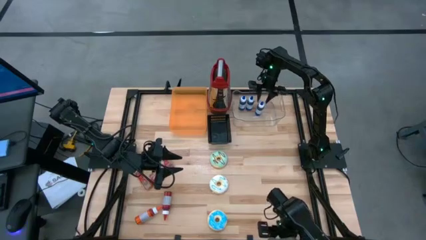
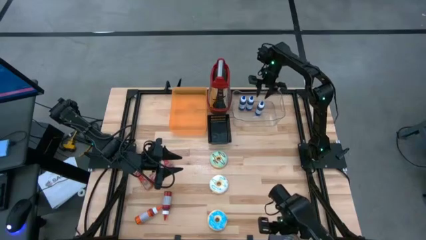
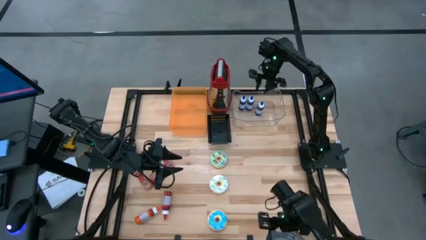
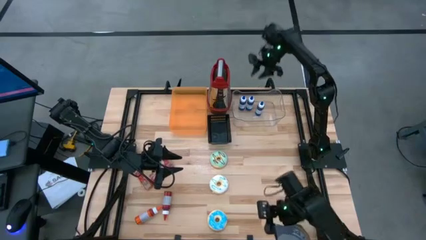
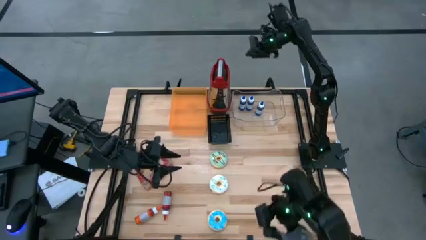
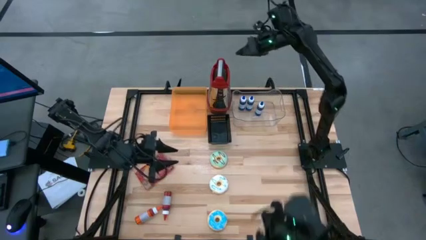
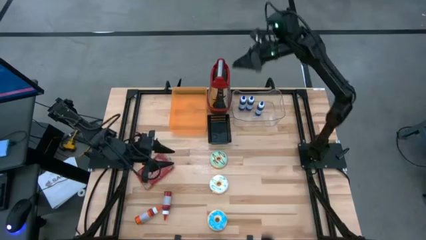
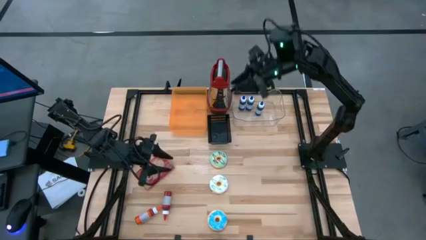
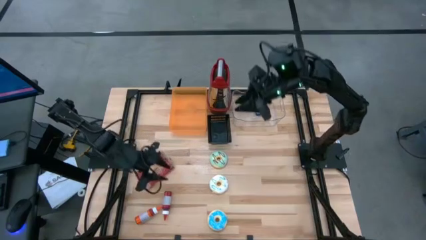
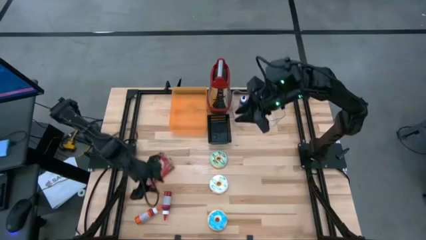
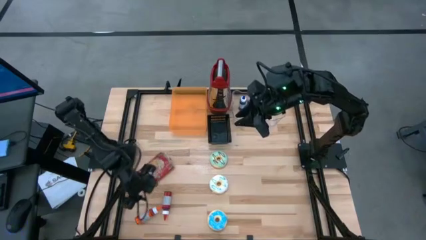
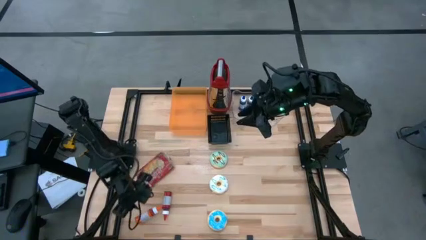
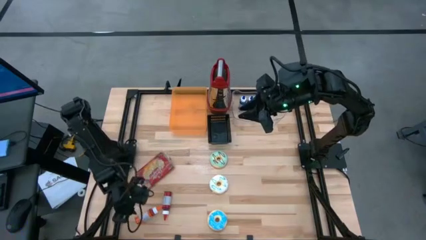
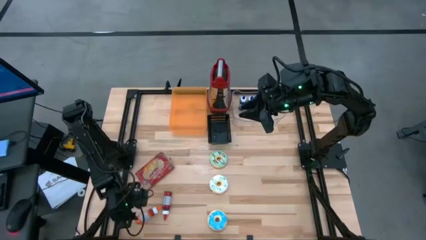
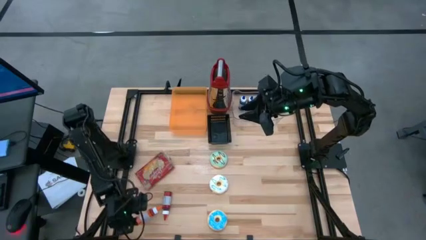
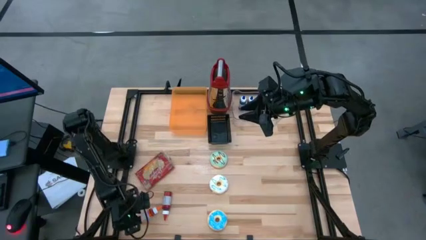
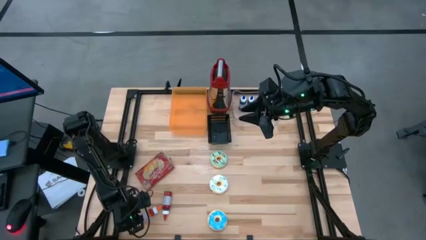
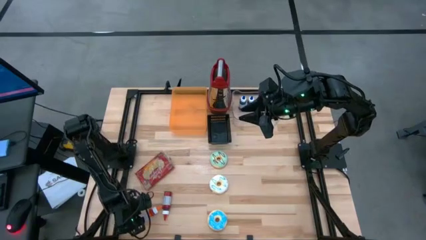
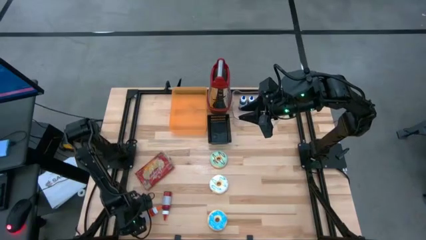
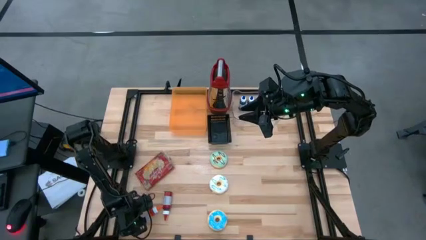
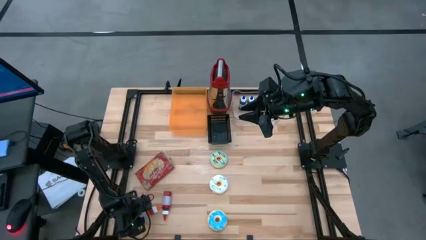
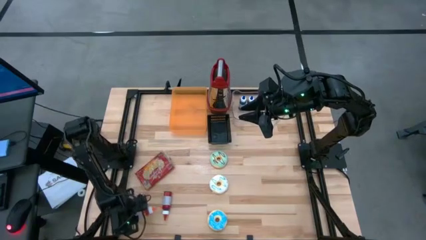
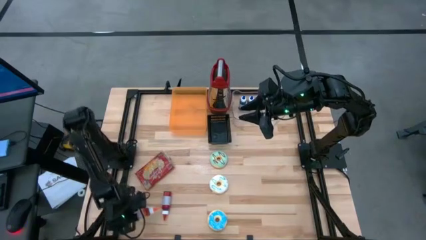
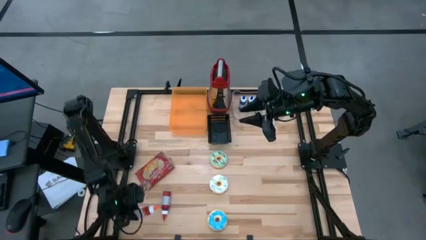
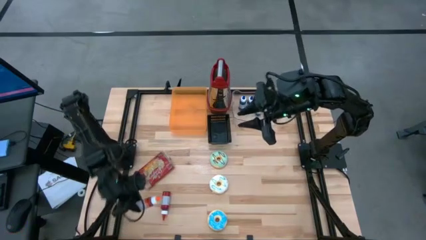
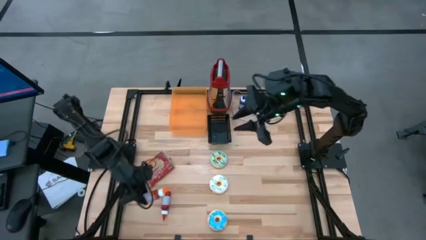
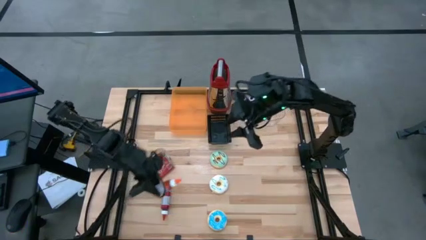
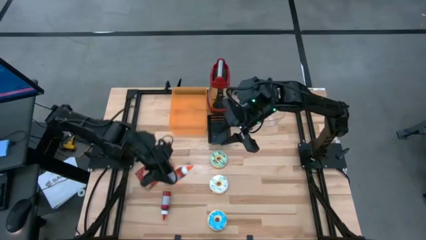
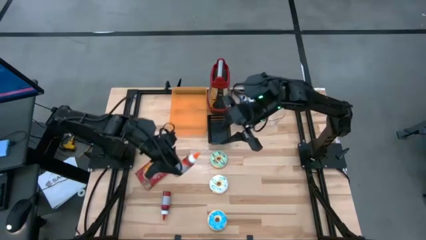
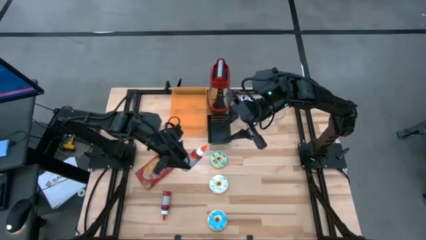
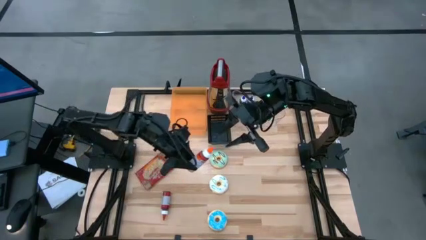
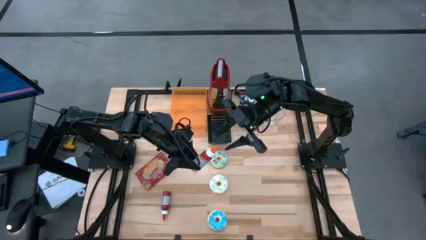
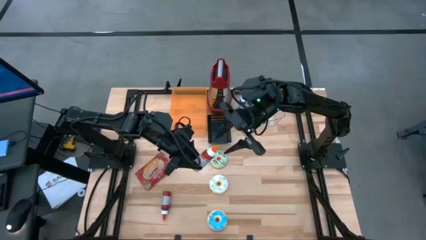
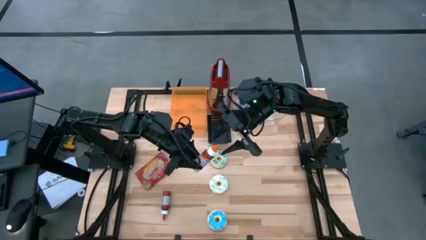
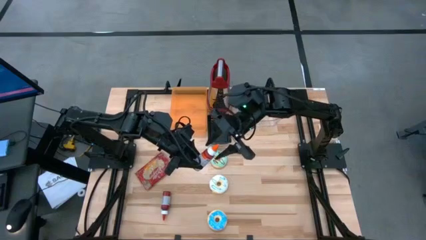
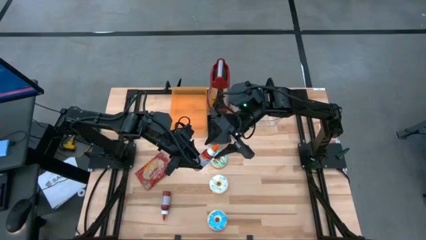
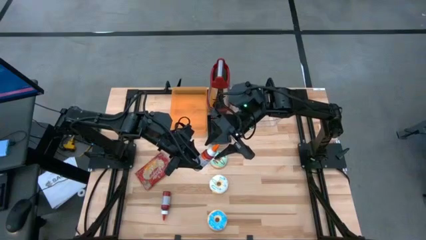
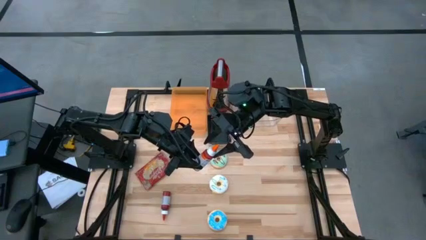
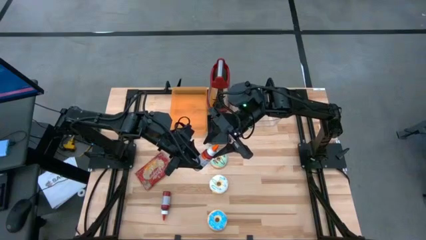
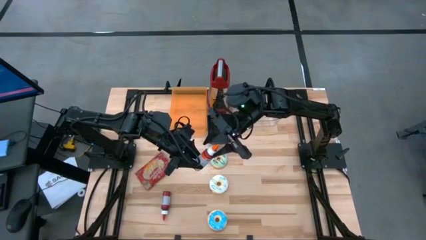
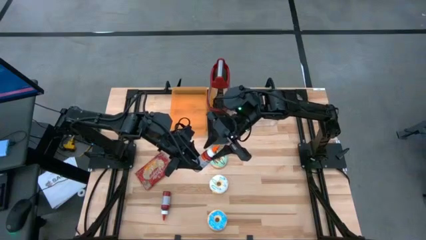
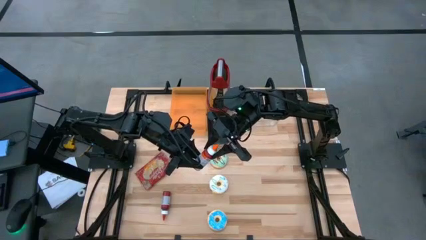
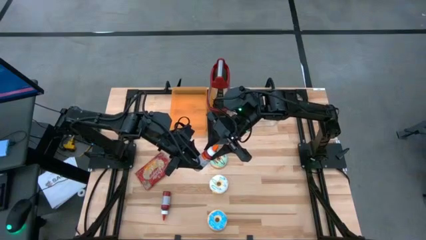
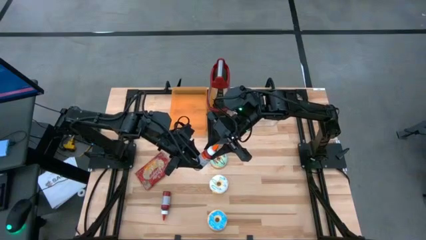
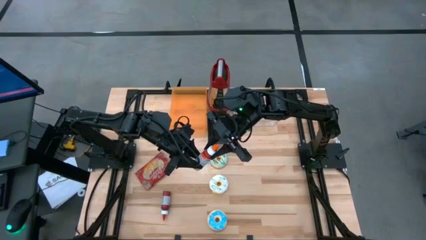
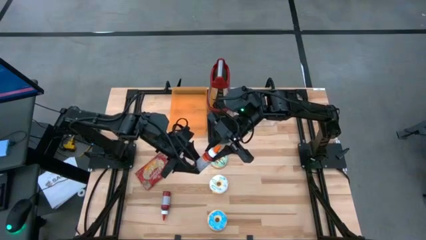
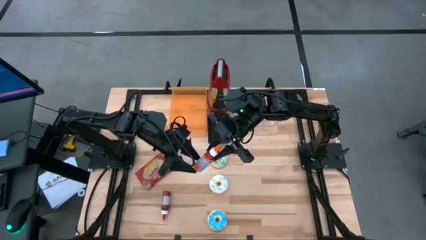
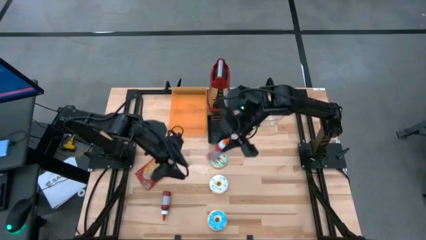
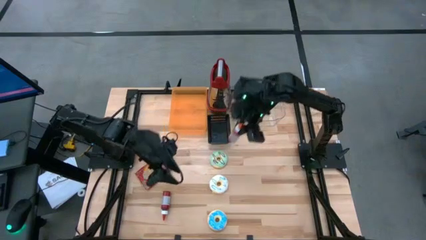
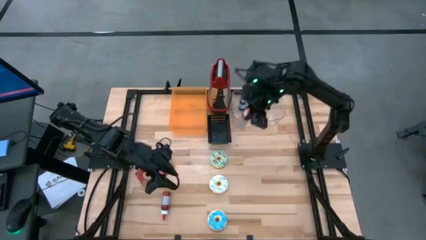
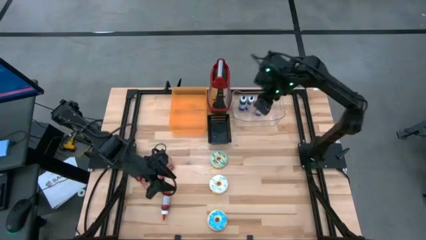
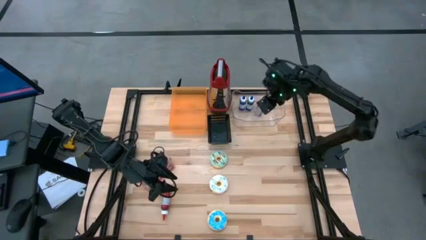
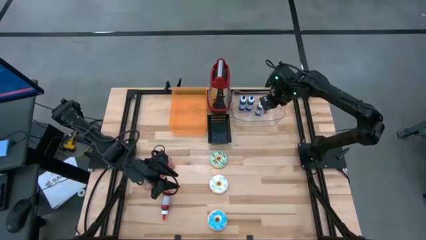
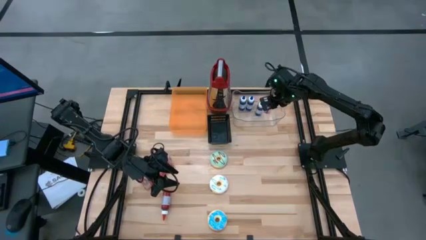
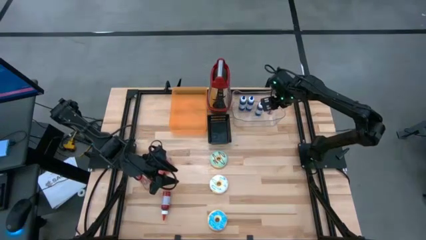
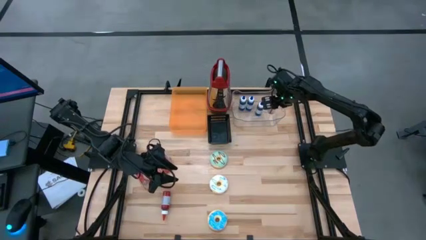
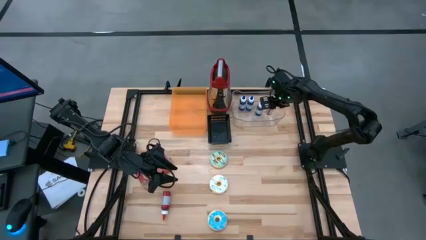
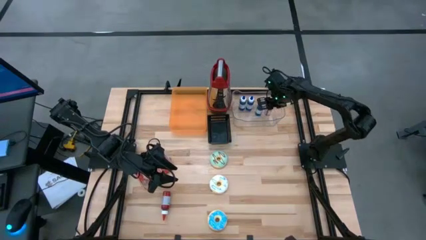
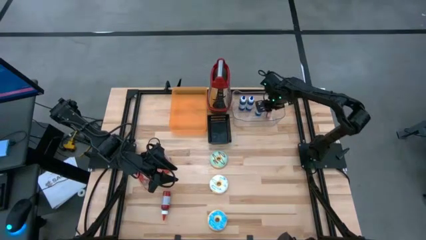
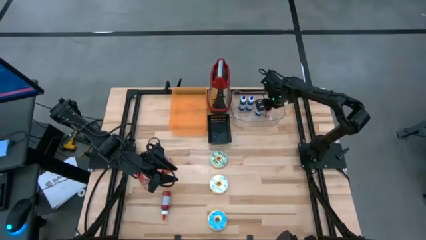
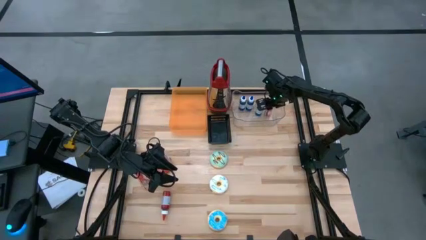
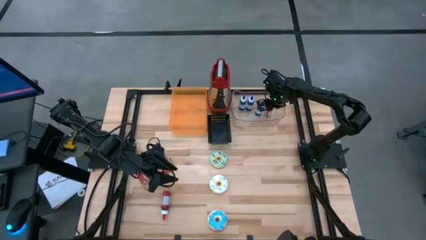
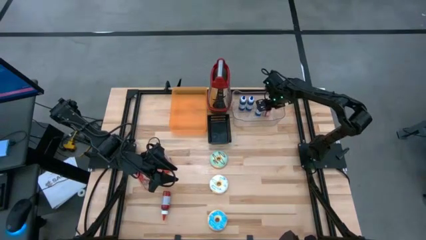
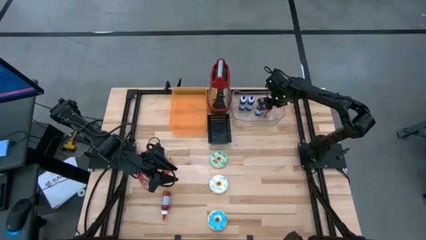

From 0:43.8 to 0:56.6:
Put the orange food coloring bottle into the transparent bin

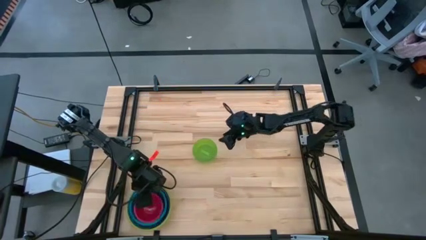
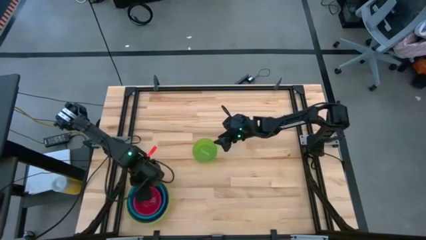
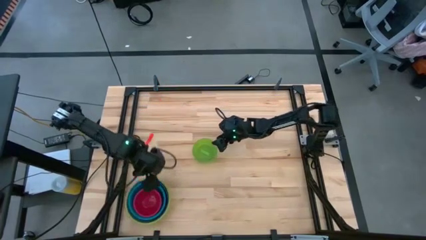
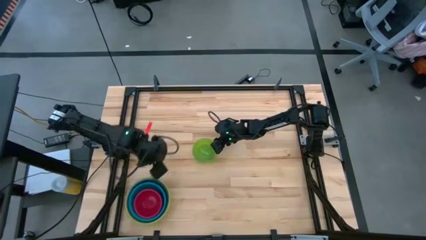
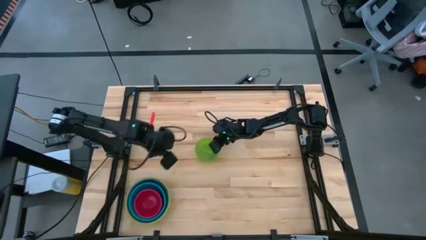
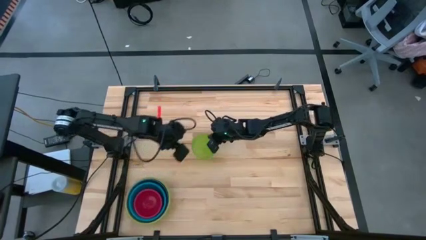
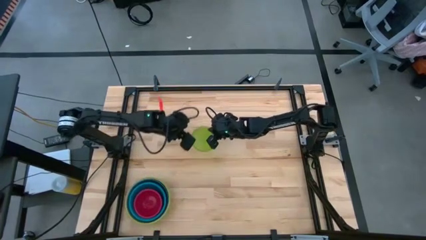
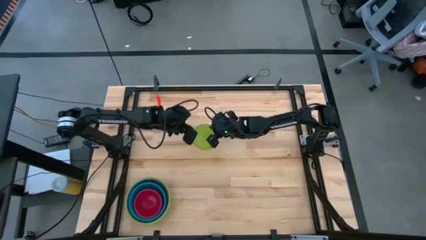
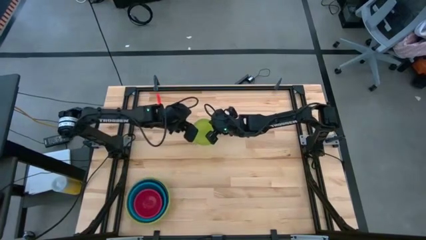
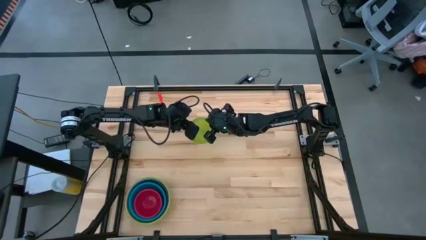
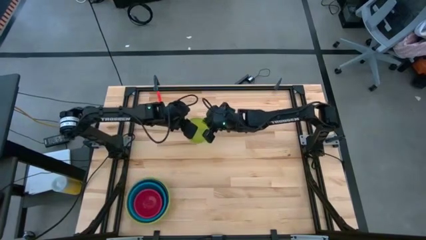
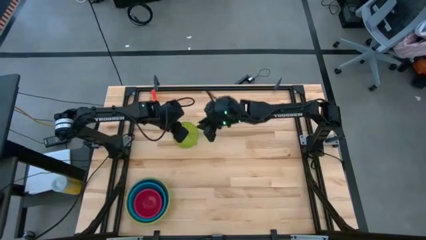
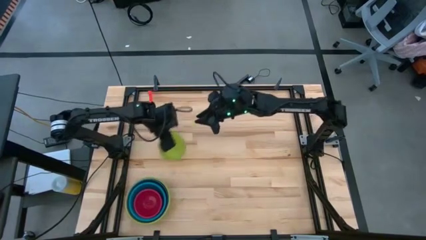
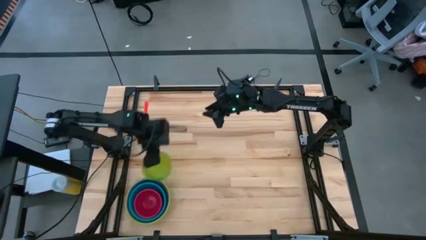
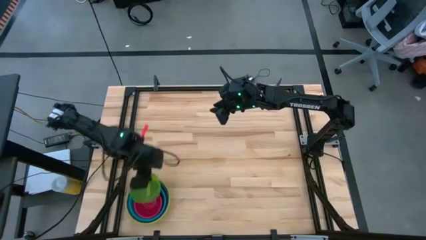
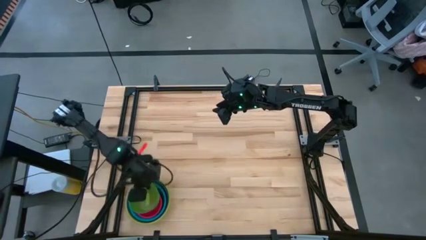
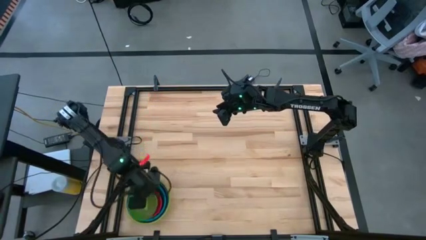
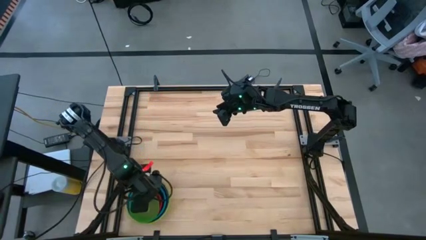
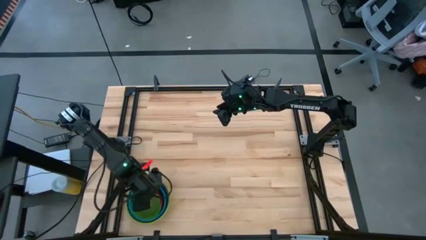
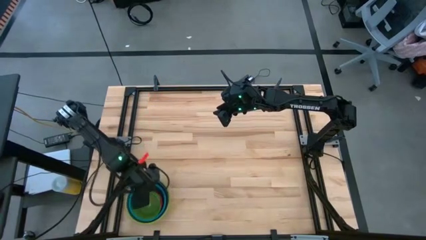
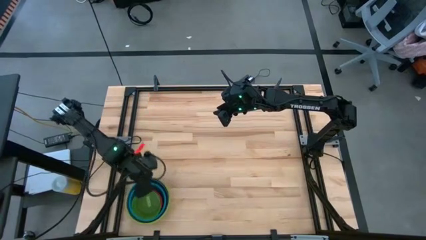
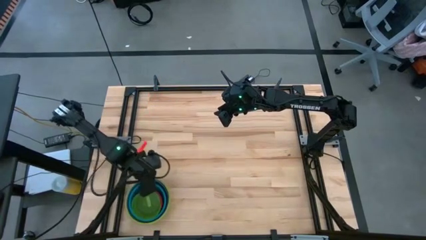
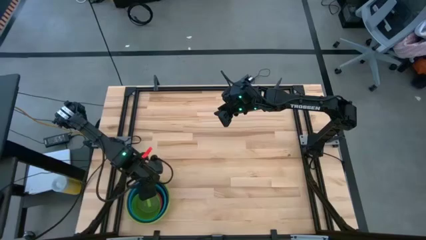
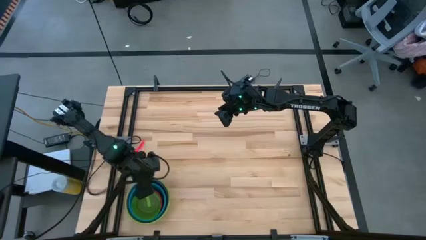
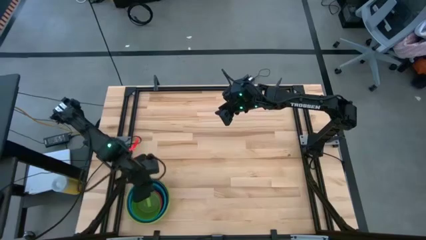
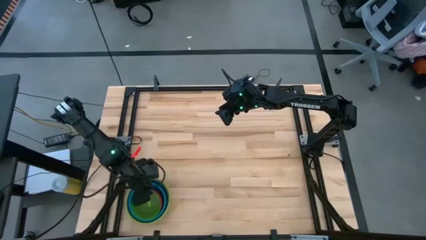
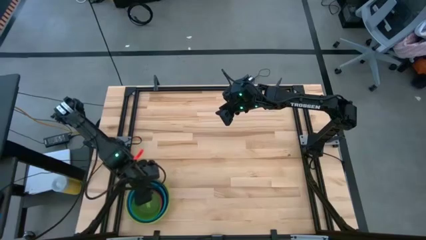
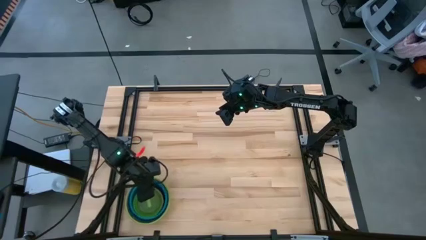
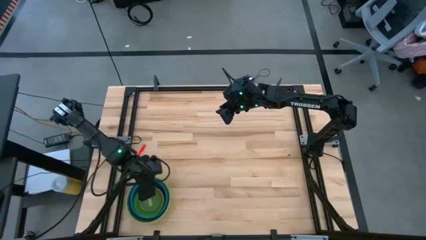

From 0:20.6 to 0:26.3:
Stack the light green bowl on top of the red bowl
